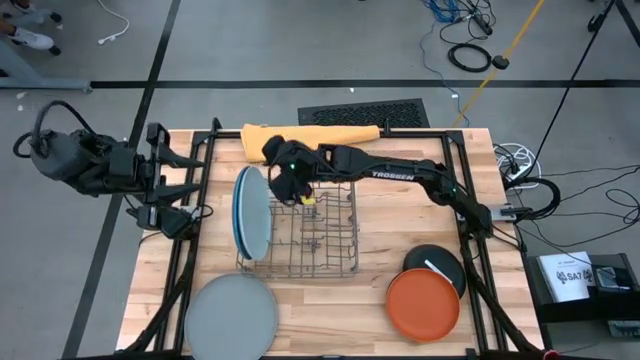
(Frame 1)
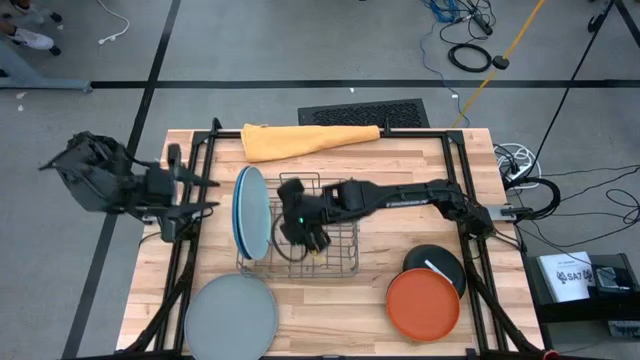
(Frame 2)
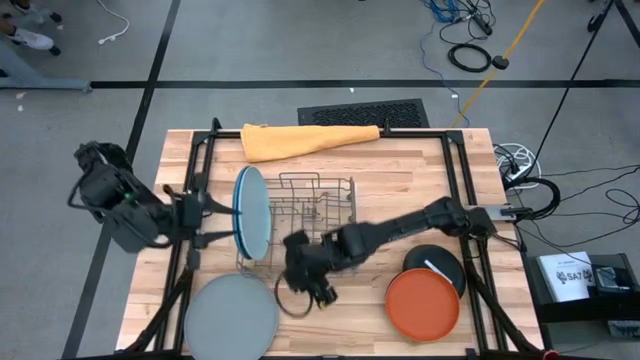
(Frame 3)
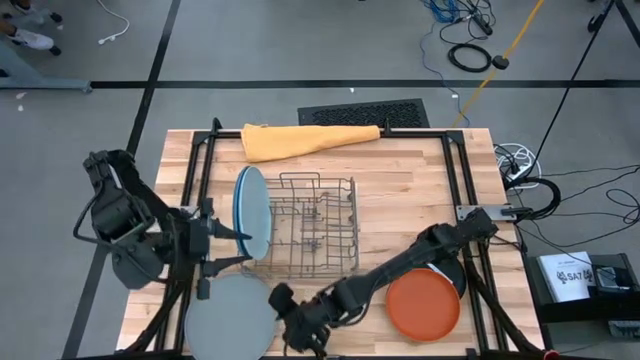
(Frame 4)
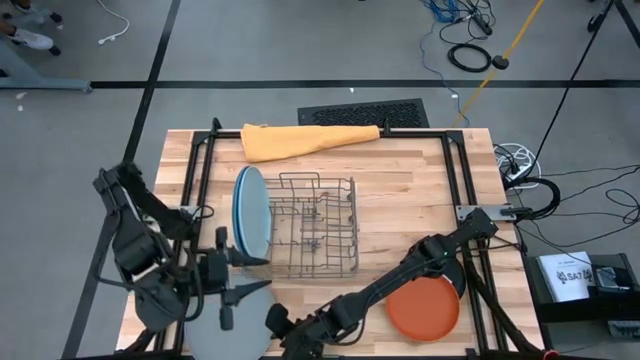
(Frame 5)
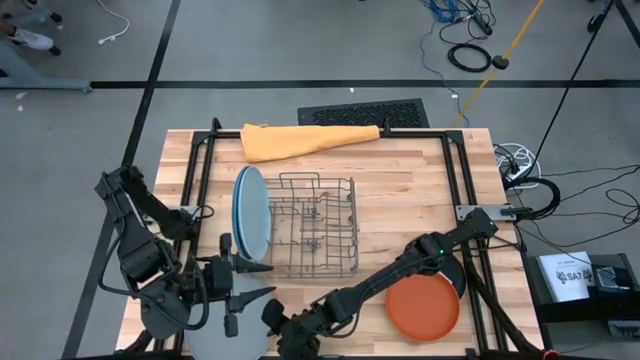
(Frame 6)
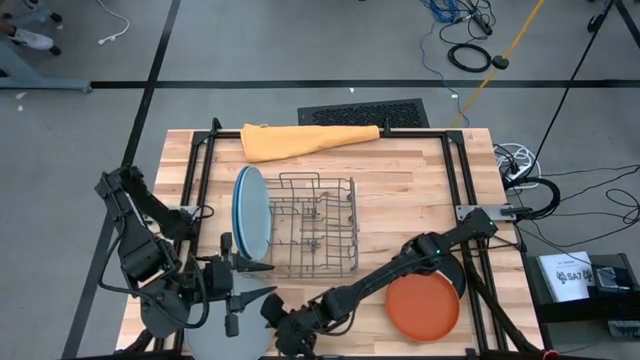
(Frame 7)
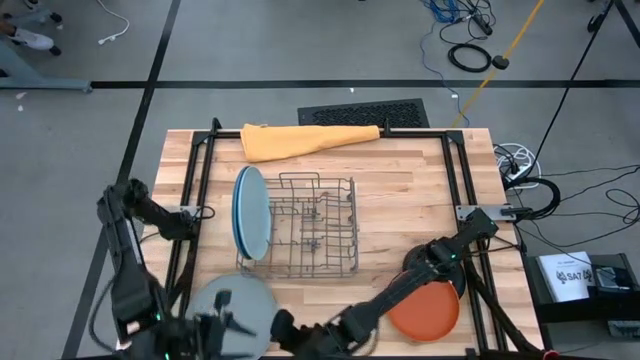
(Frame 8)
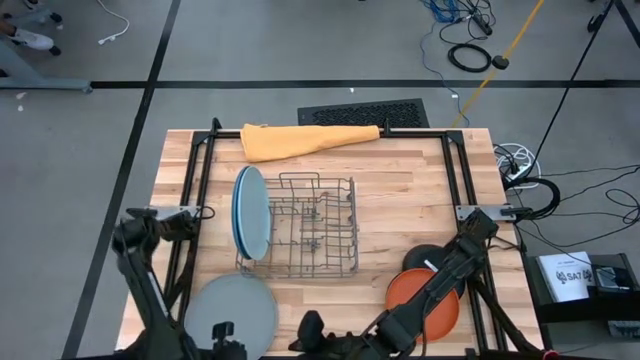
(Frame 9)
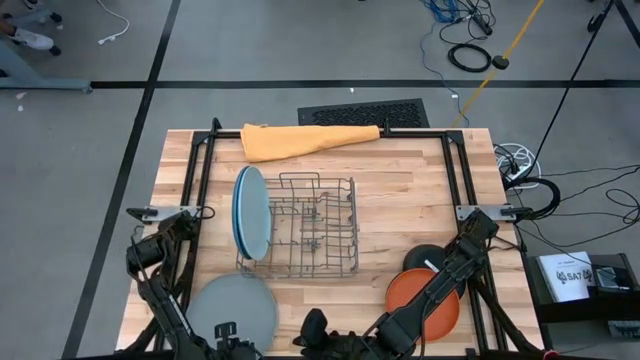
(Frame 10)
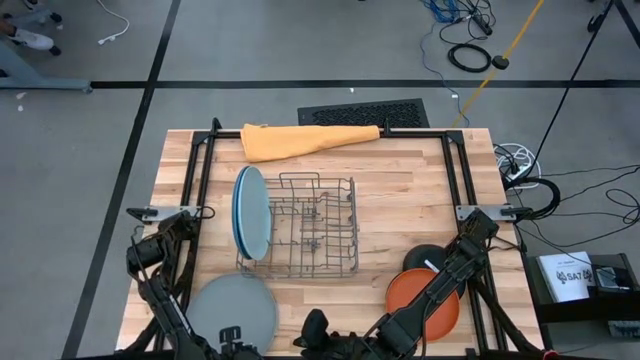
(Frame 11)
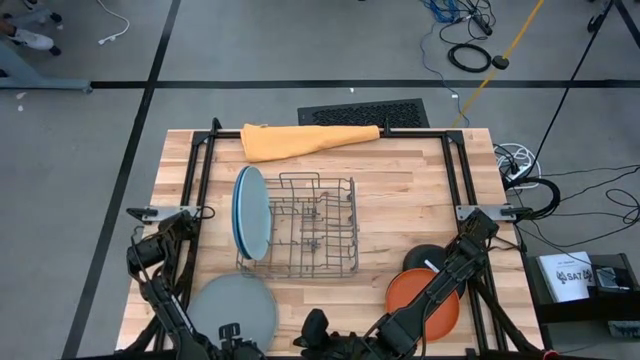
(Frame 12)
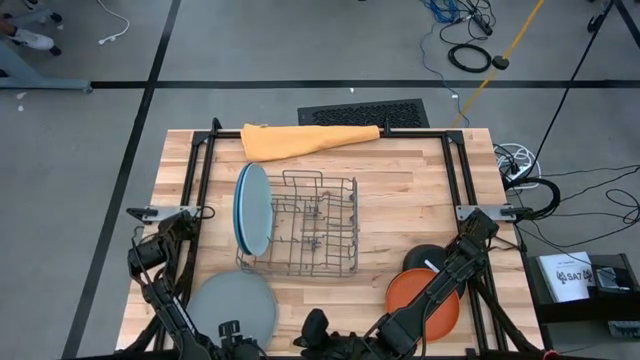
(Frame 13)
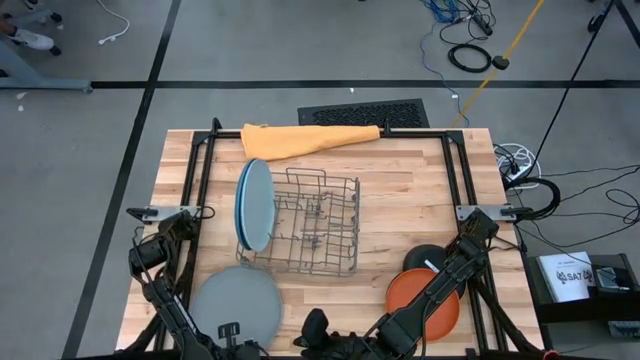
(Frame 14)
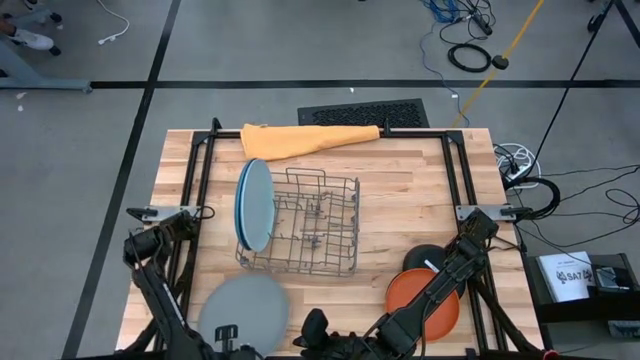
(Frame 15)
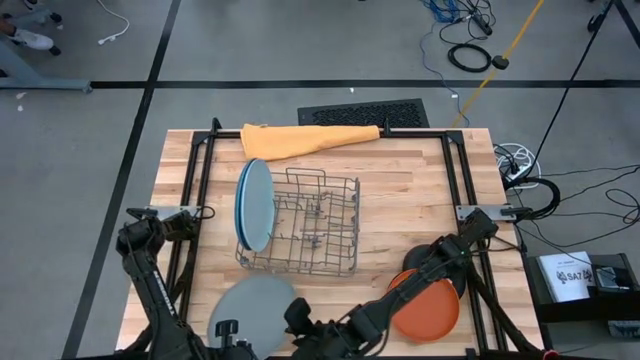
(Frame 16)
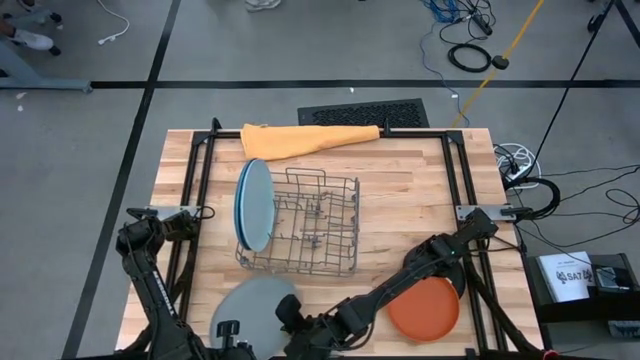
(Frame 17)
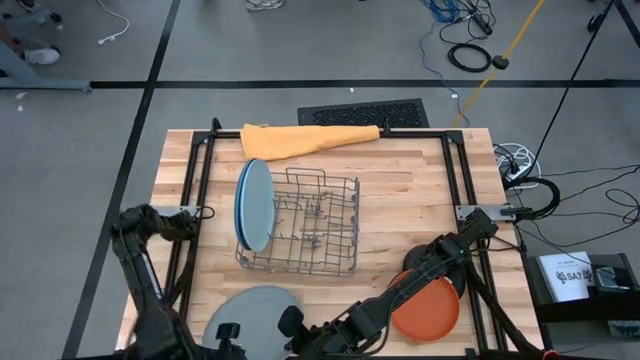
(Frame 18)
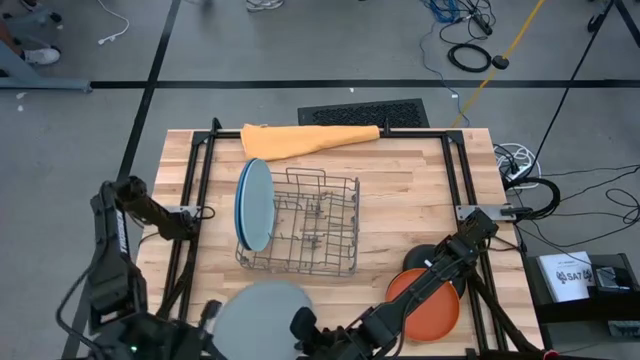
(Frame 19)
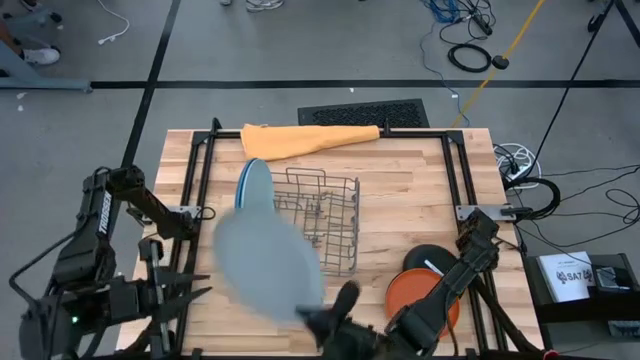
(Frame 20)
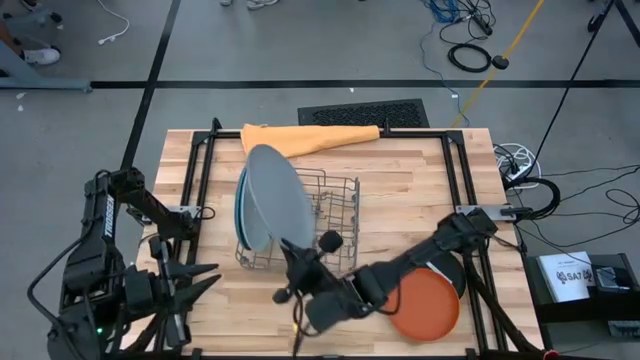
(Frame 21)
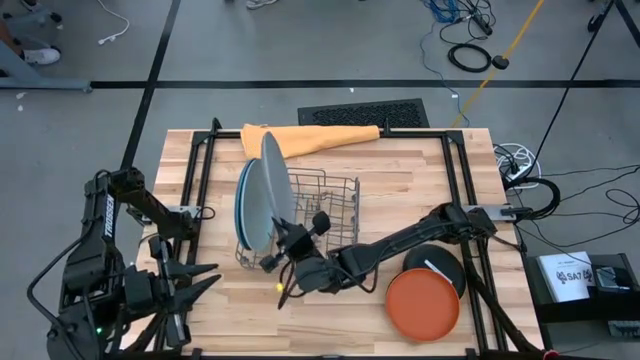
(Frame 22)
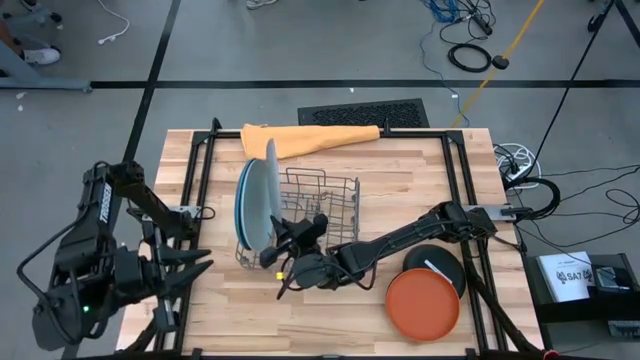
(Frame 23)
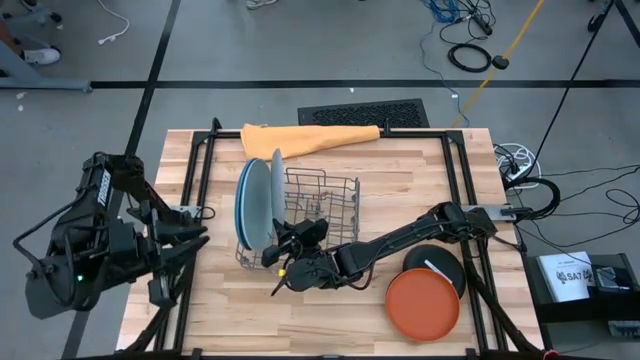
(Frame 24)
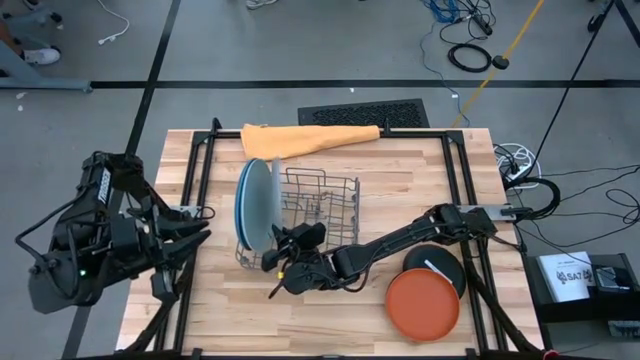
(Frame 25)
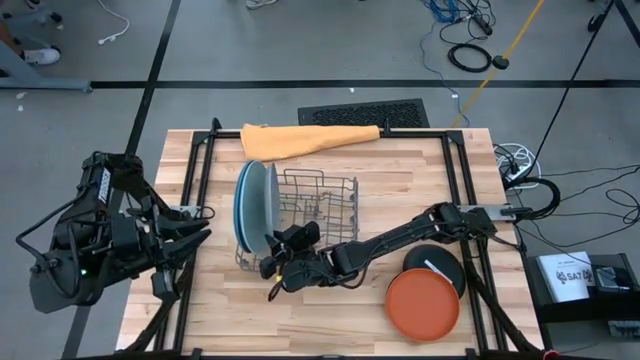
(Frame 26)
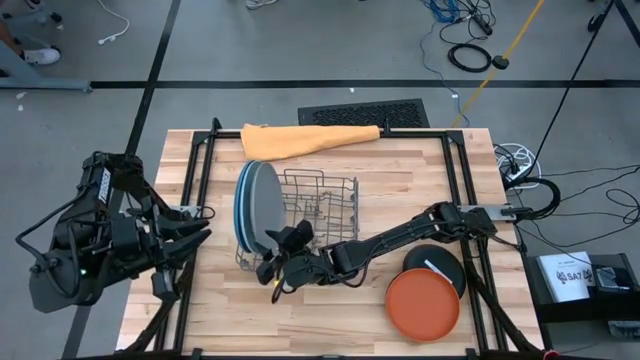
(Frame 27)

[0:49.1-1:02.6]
Task: Sort dishes
Put the gray plate in the dish rack

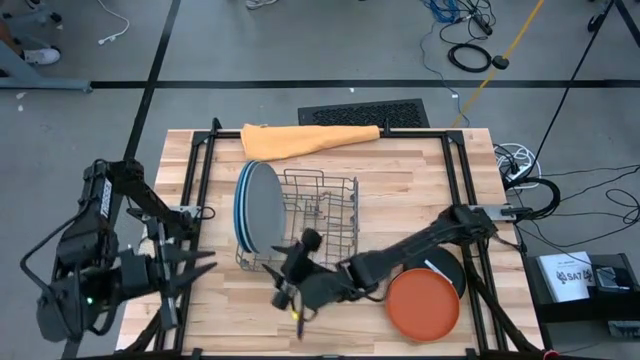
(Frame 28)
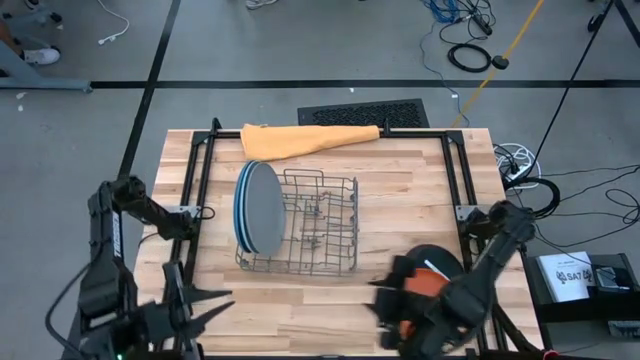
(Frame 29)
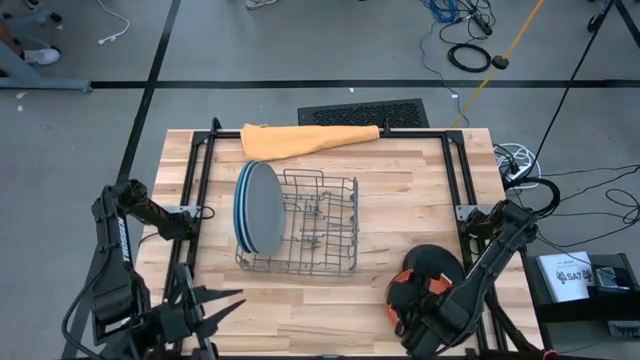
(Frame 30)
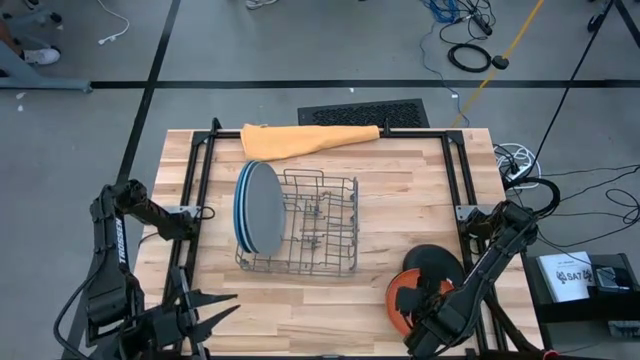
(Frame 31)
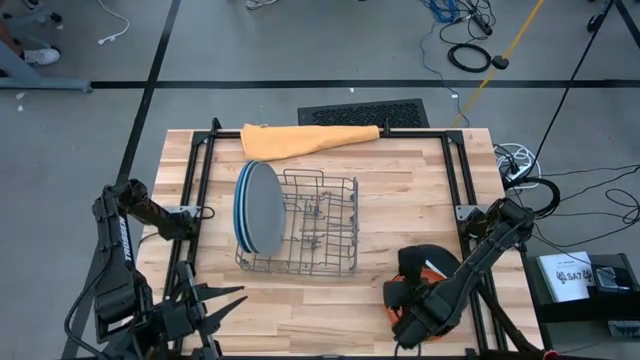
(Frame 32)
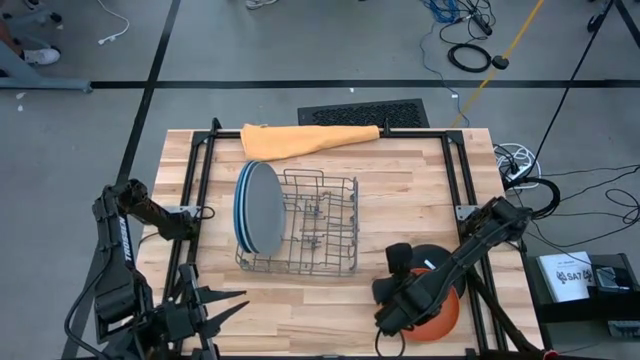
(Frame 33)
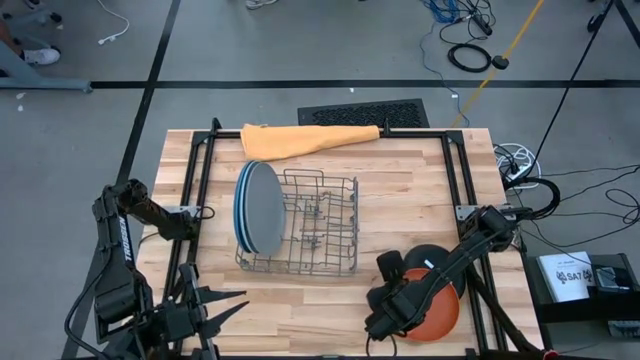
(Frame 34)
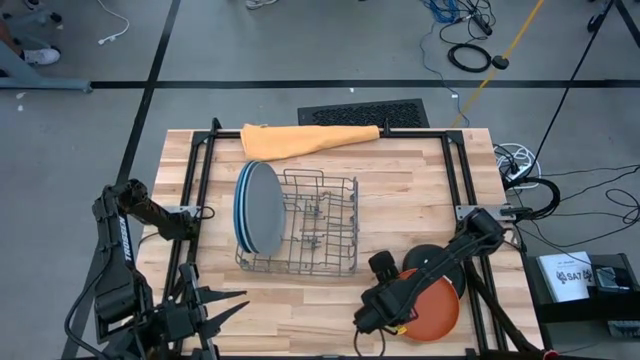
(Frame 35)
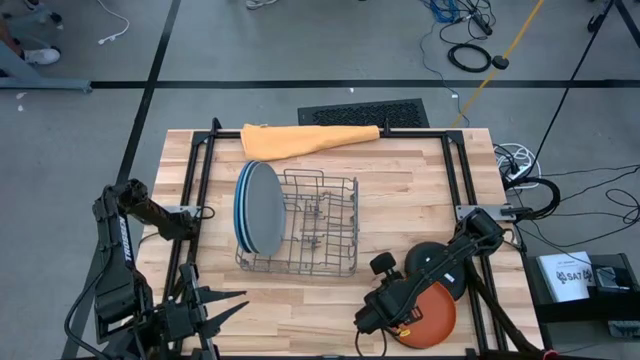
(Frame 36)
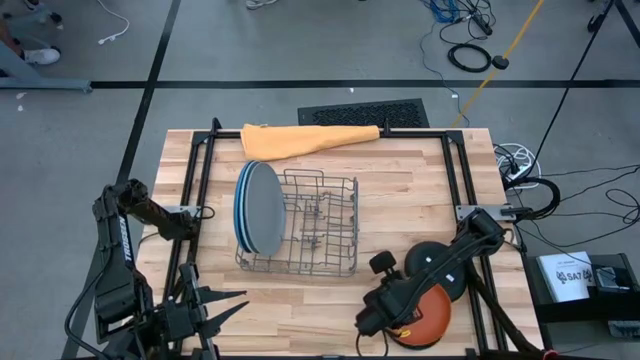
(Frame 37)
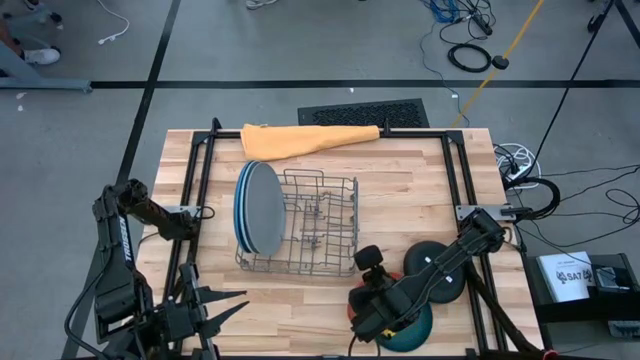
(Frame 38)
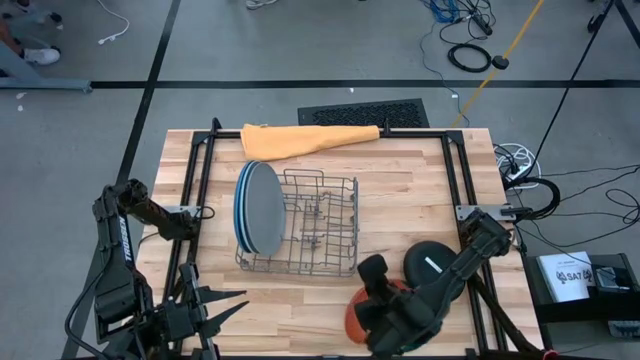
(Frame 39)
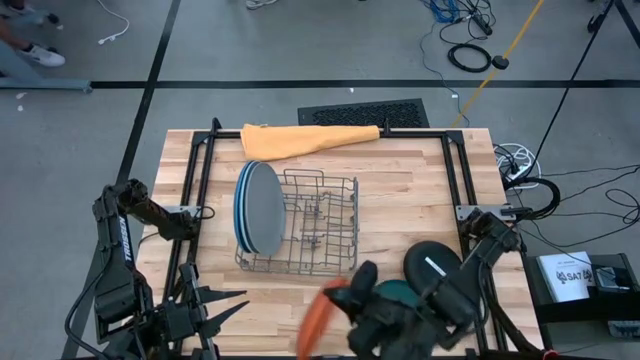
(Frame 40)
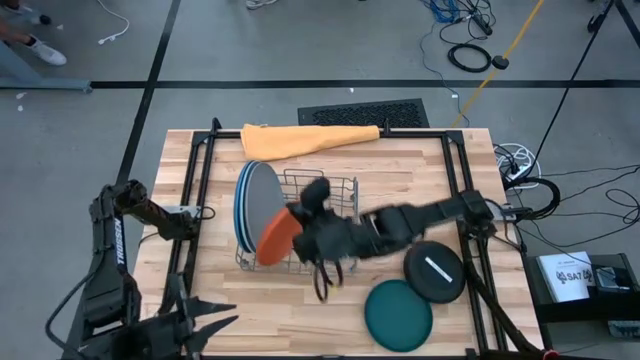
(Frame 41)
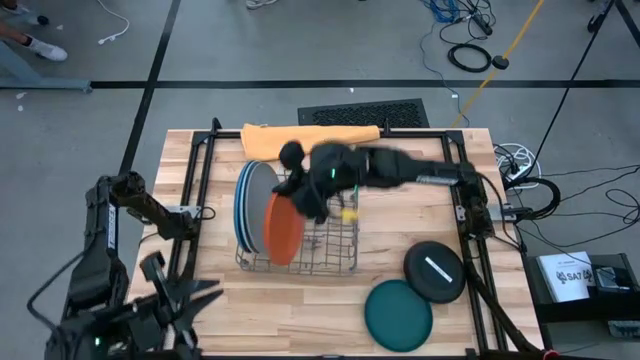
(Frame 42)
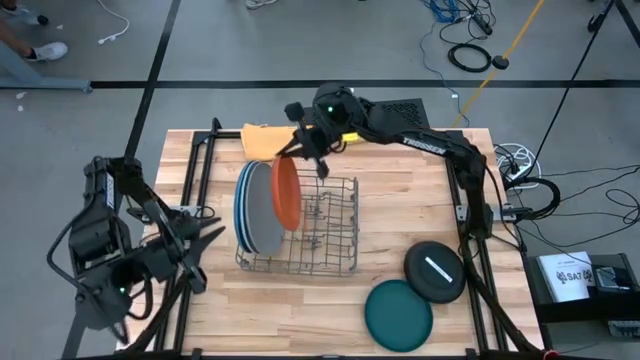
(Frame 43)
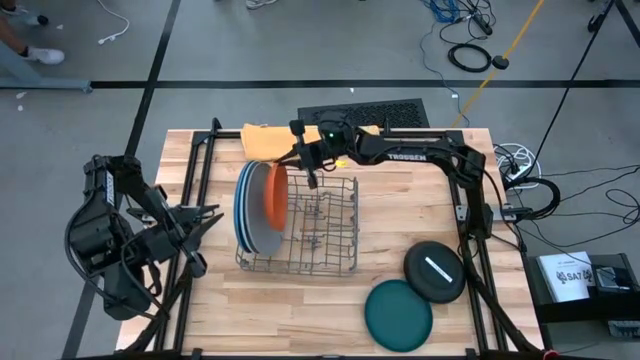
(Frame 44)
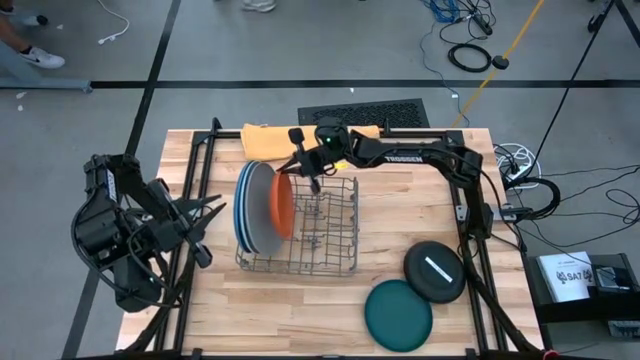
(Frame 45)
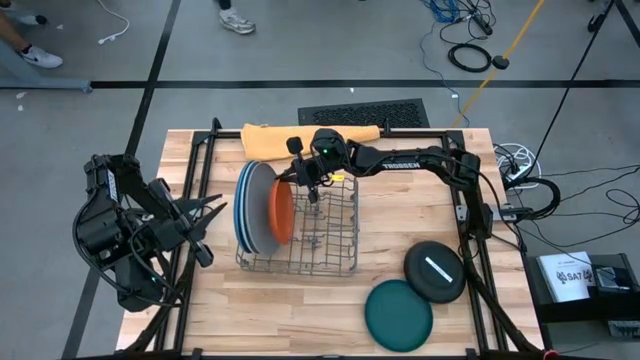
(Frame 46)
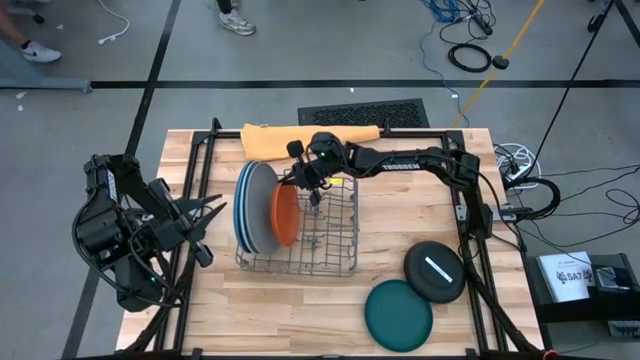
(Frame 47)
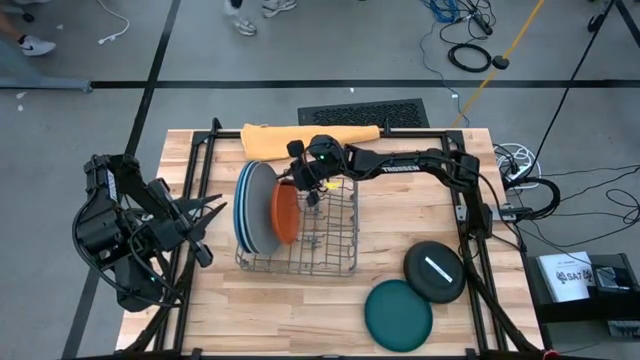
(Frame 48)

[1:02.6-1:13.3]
Put the orange plate in the dish rack
